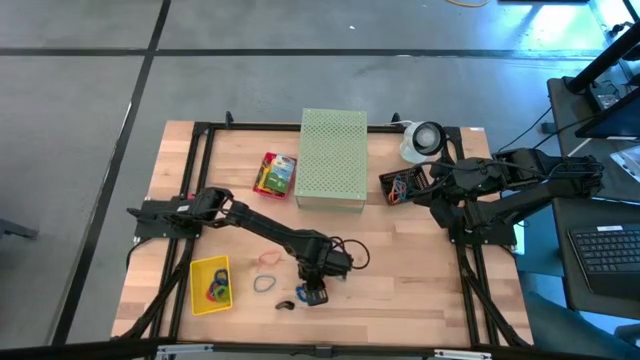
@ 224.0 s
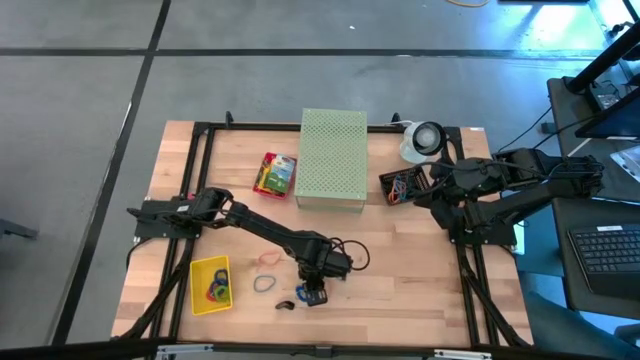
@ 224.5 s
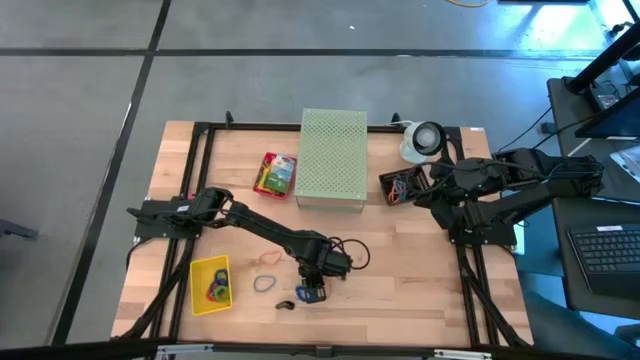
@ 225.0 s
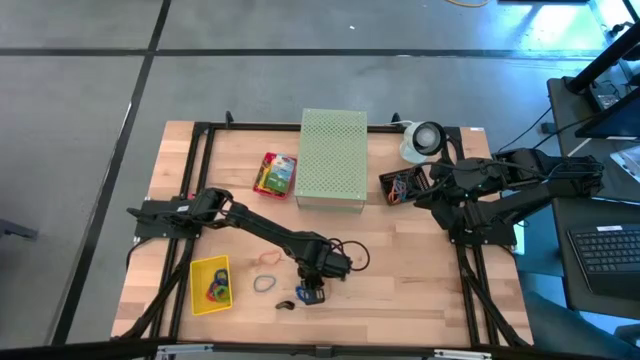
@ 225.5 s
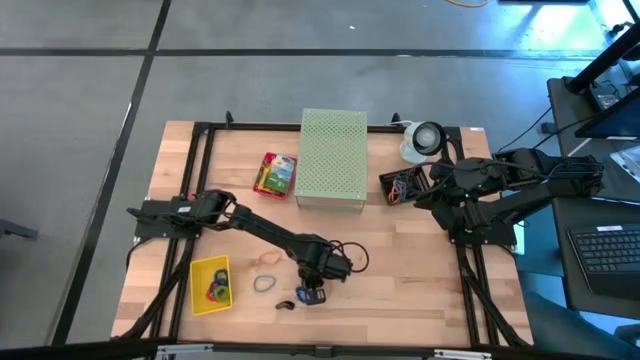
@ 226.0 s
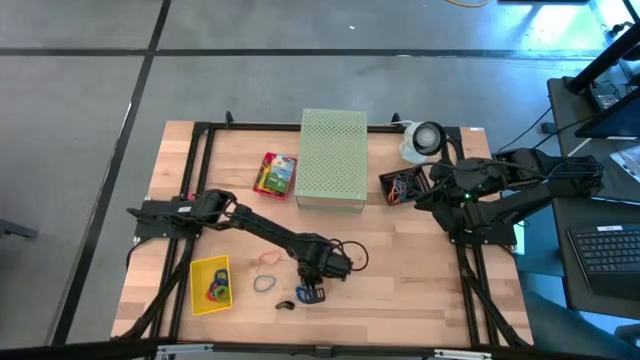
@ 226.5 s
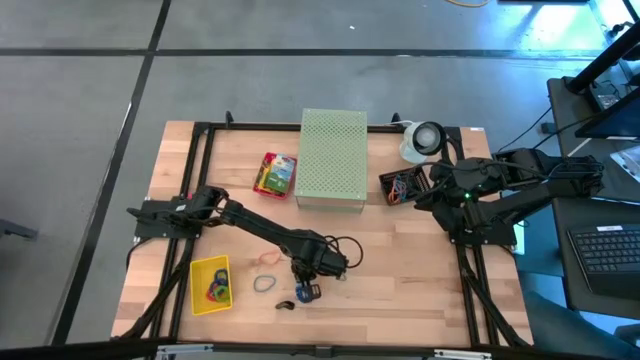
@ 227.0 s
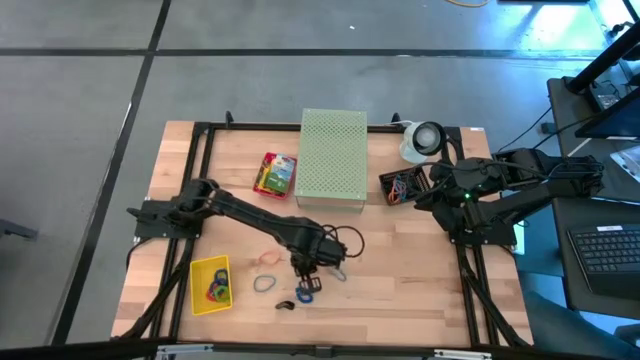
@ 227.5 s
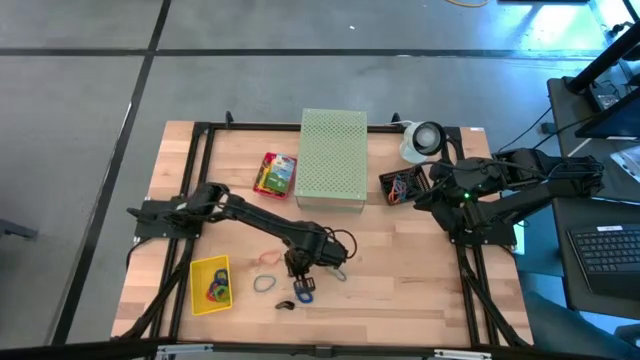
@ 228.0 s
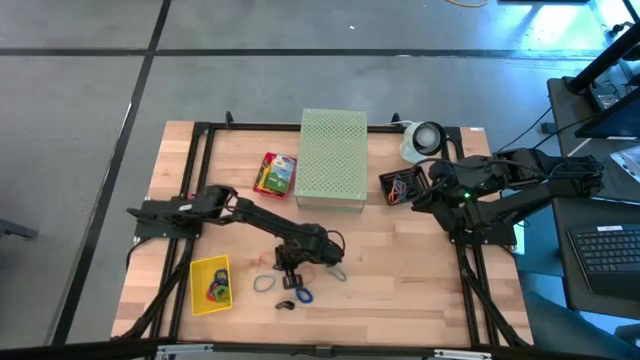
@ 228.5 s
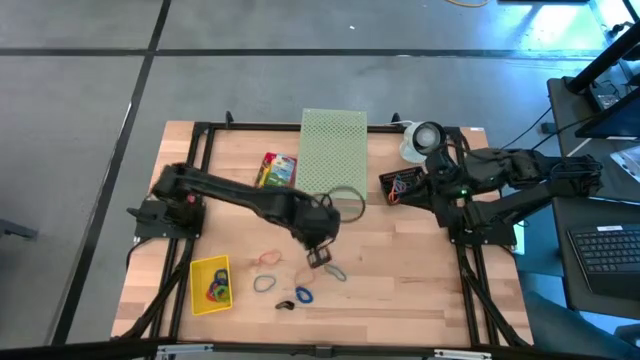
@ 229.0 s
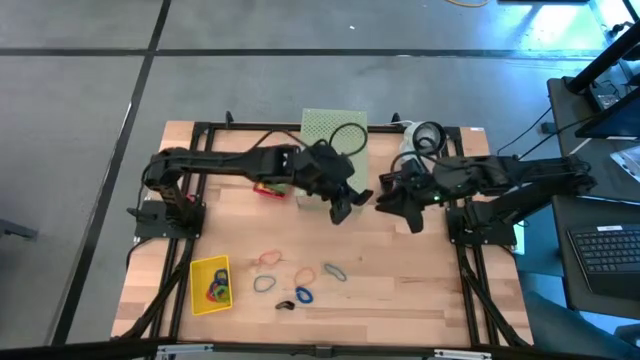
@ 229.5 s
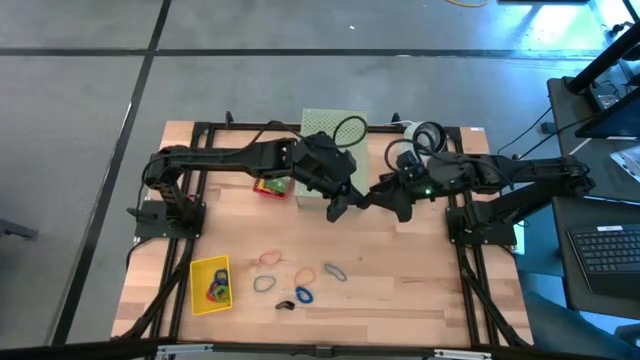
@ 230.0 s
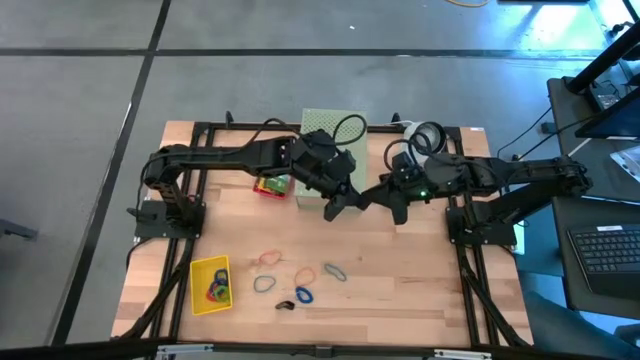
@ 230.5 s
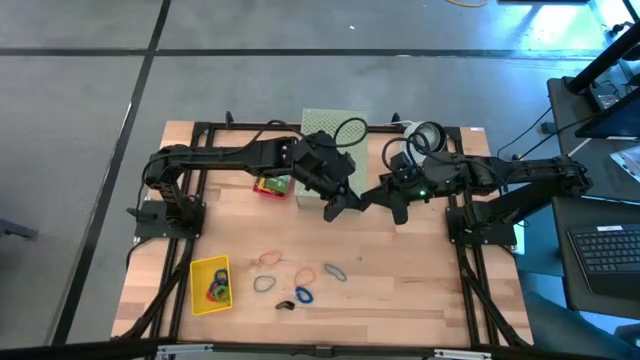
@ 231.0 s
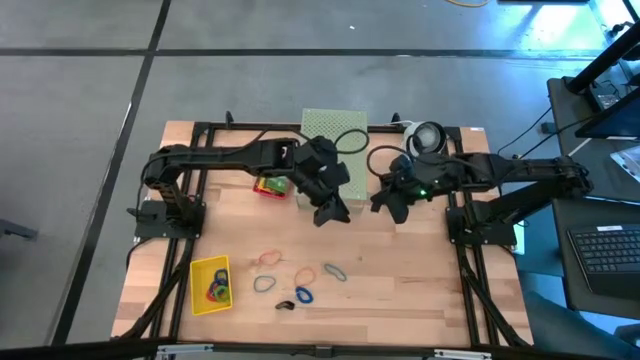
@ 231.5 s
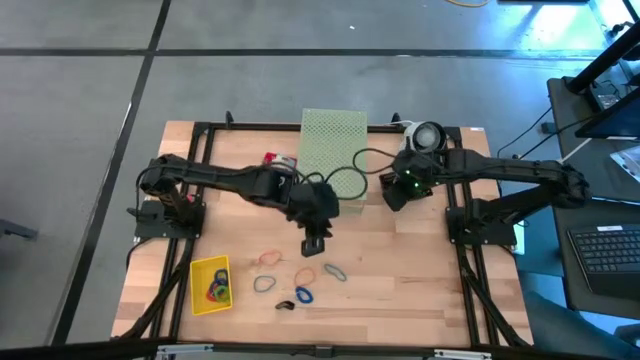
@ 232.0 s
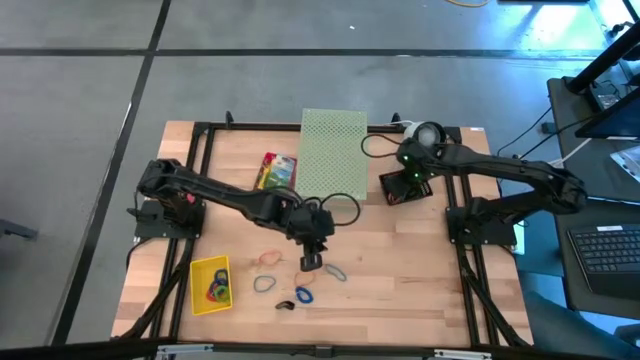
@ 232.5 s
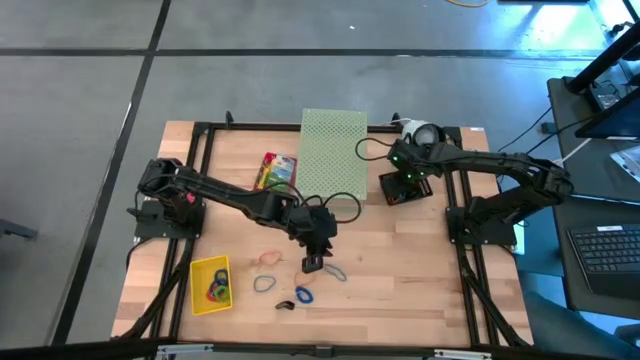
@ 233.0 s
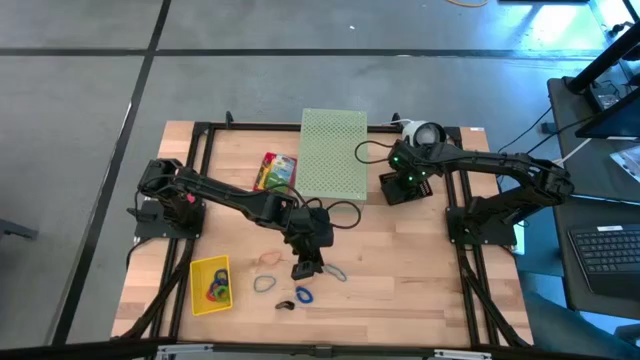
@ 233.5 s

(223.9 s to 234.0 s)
Task: Pick & Place Office Desk Supplies
Put the black rubber band into the black bin

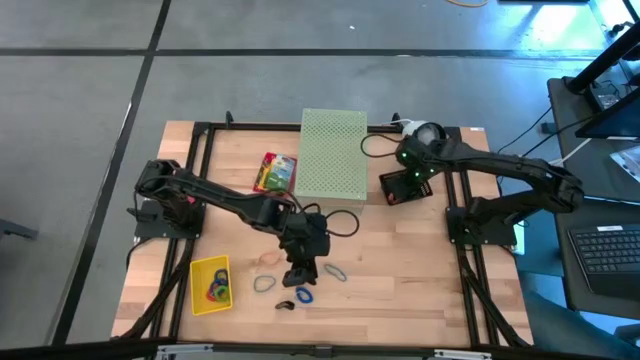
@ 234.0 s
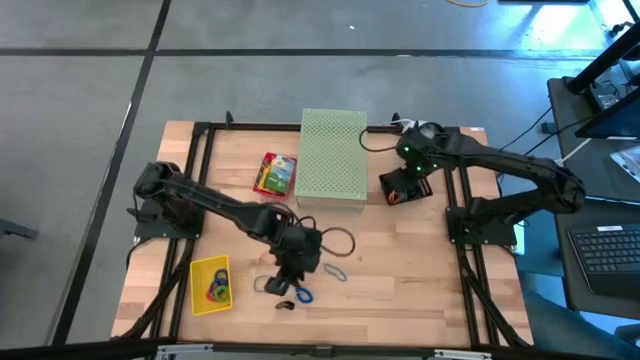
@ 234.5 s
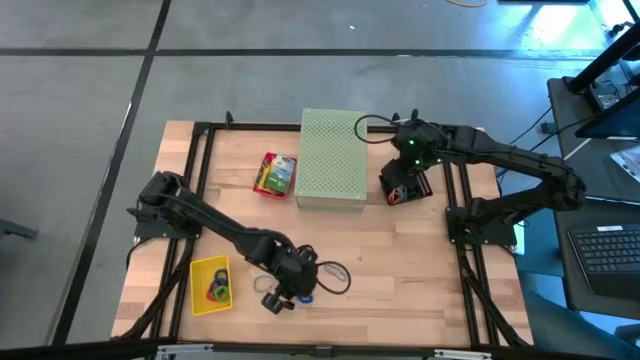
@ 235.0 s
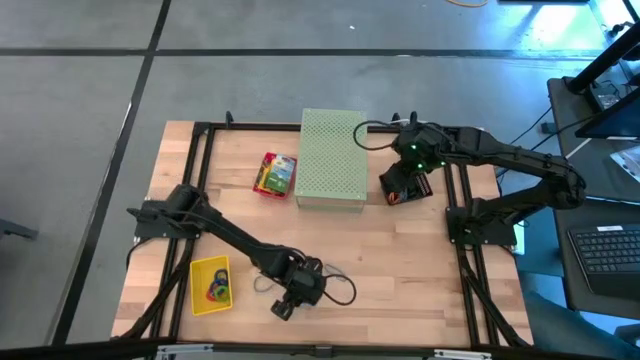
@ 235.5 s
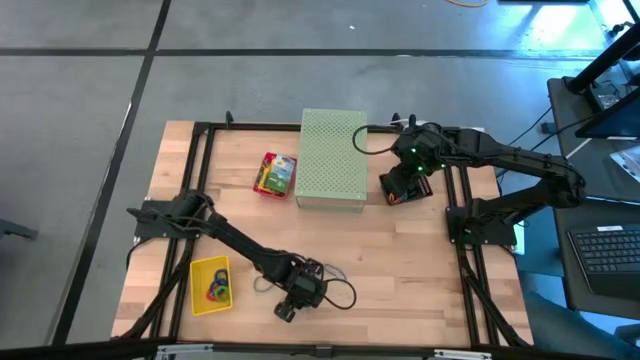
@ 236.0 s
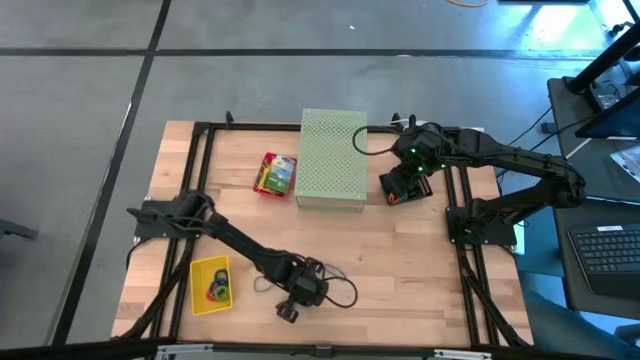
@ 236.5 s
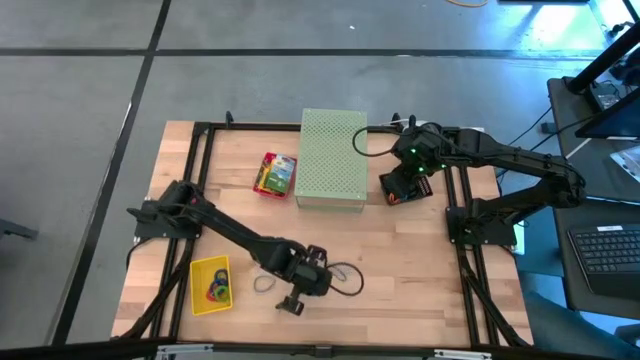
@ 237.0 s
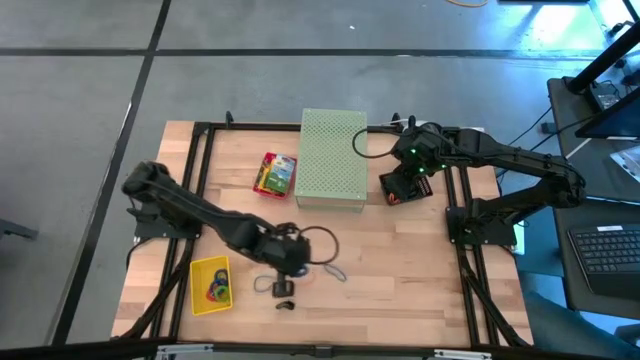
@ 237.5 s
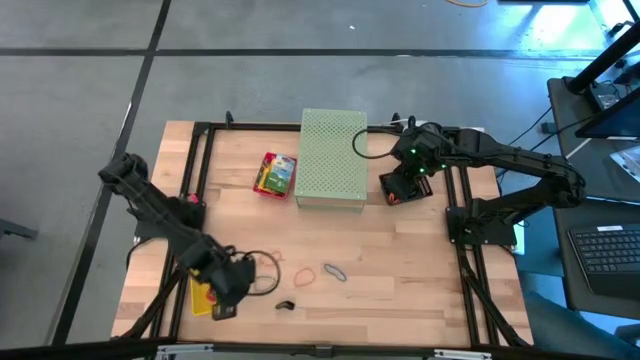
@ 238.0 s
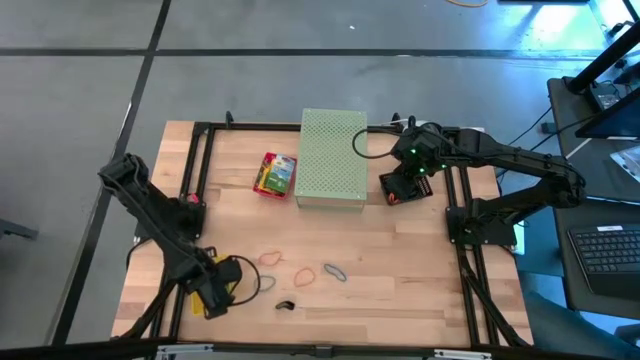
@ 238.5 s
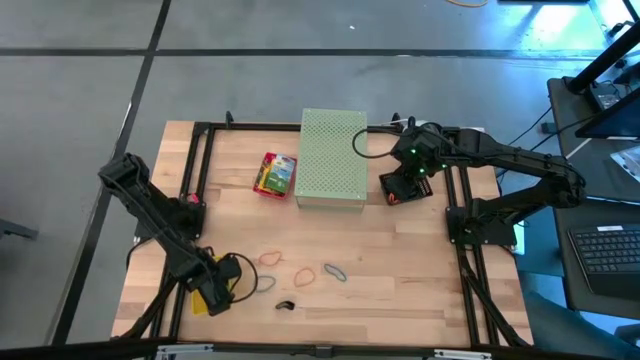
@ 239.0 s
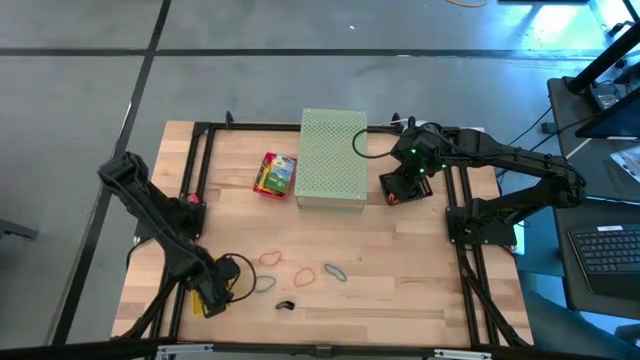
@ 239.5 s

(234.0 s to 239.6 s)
Put the blue spring rubber band into the yellow bin
